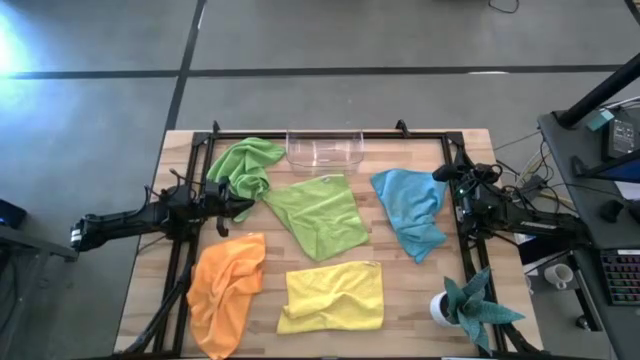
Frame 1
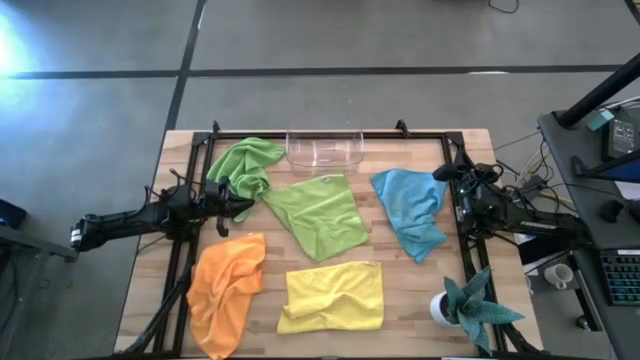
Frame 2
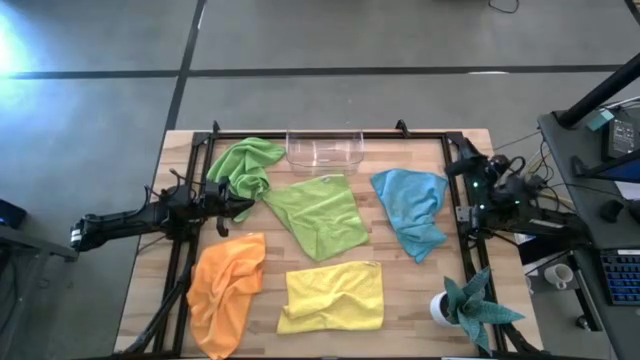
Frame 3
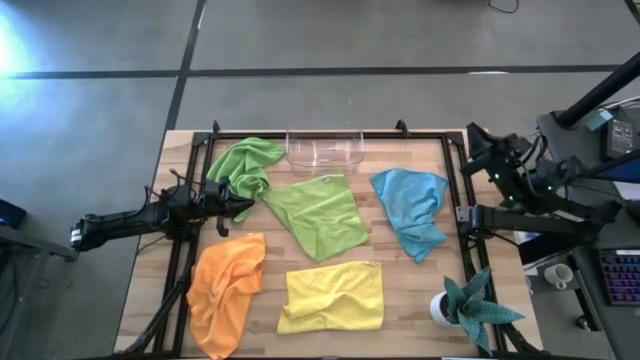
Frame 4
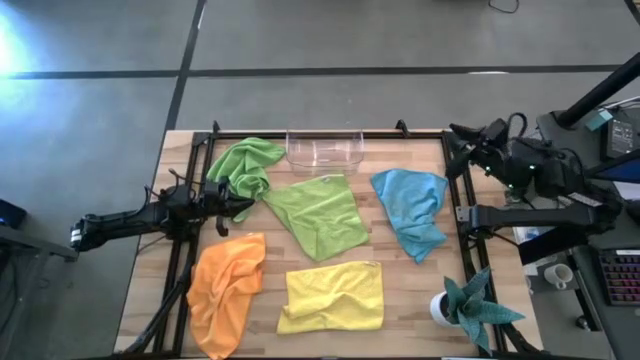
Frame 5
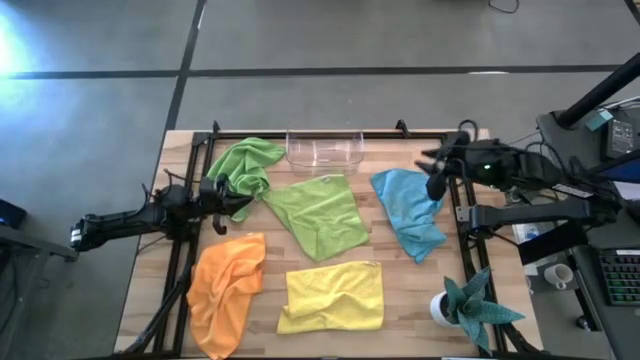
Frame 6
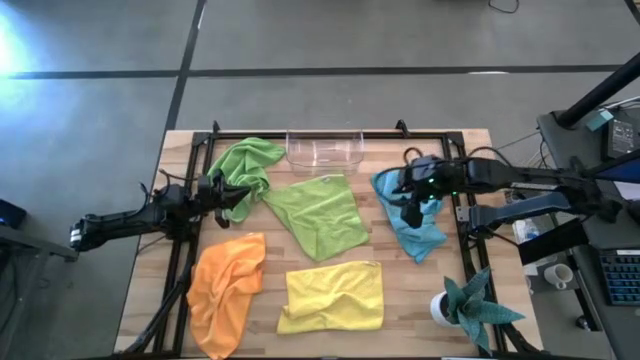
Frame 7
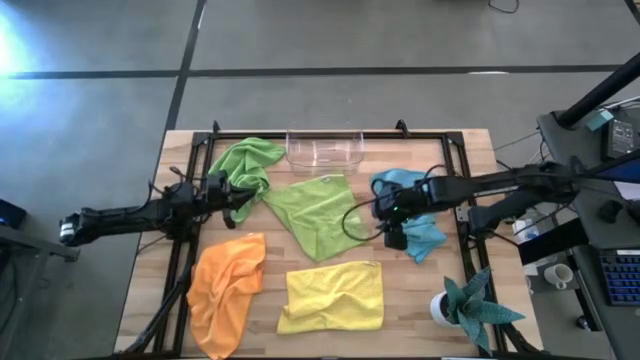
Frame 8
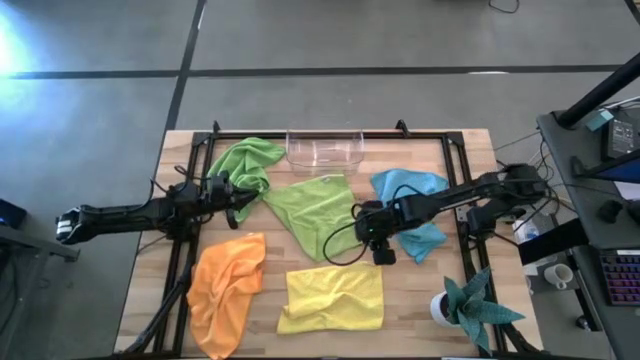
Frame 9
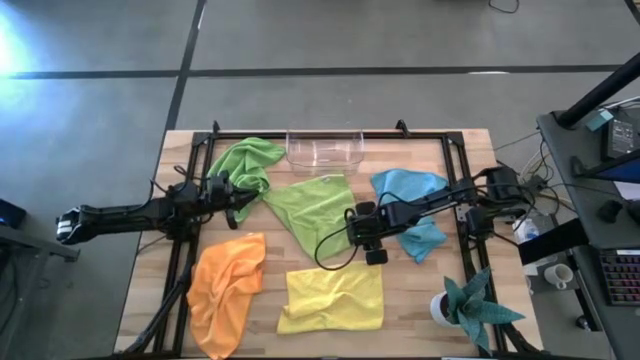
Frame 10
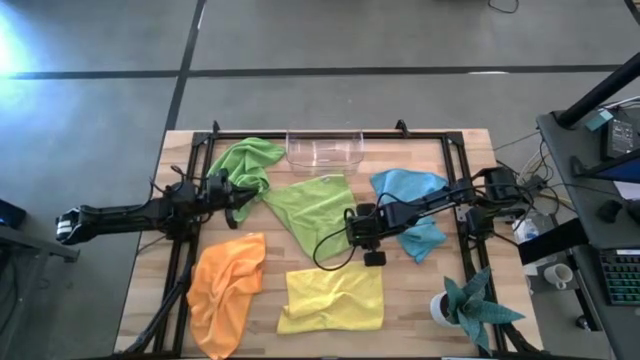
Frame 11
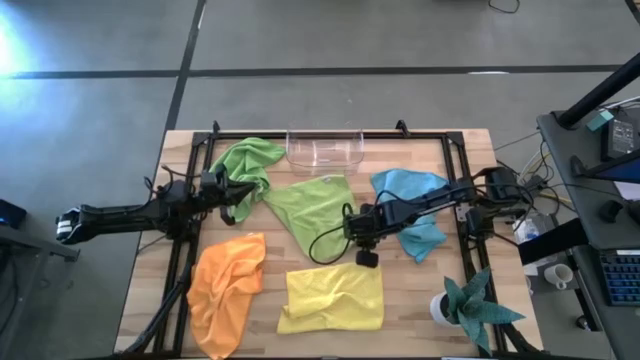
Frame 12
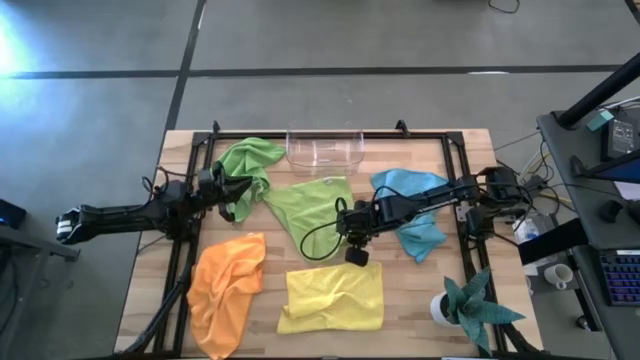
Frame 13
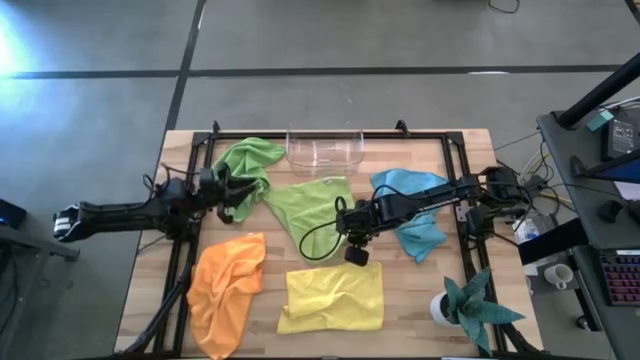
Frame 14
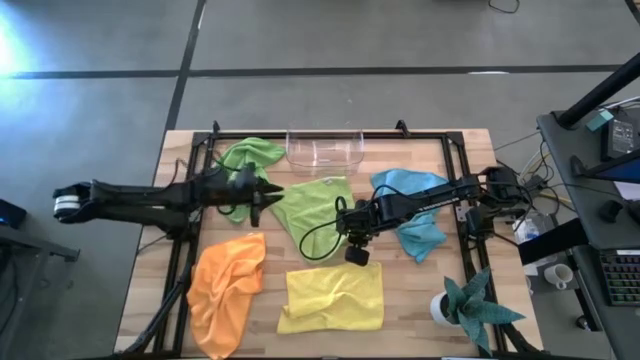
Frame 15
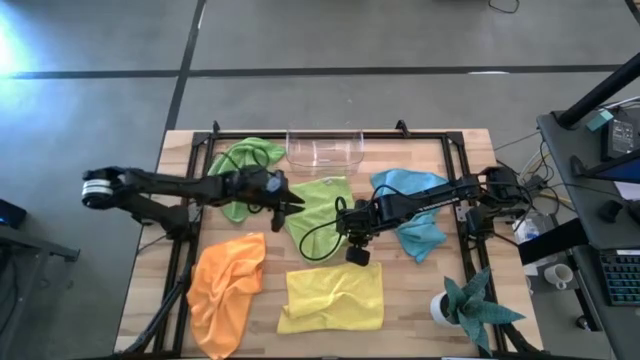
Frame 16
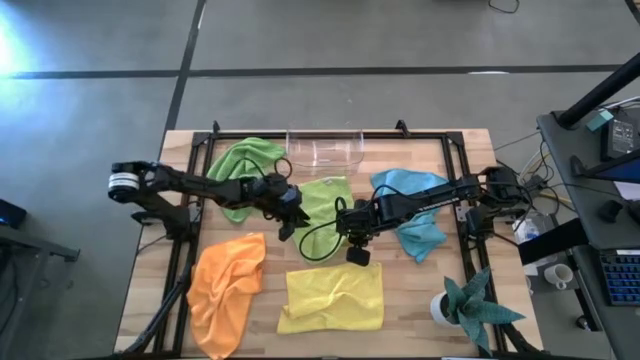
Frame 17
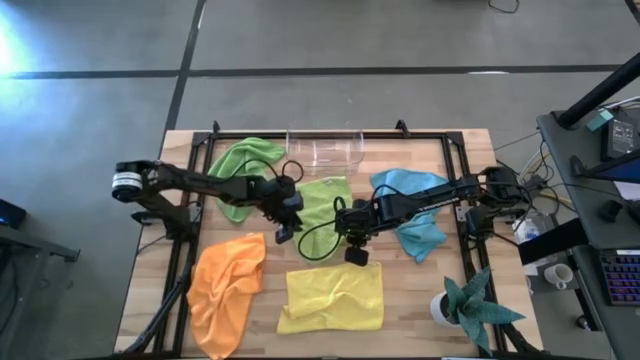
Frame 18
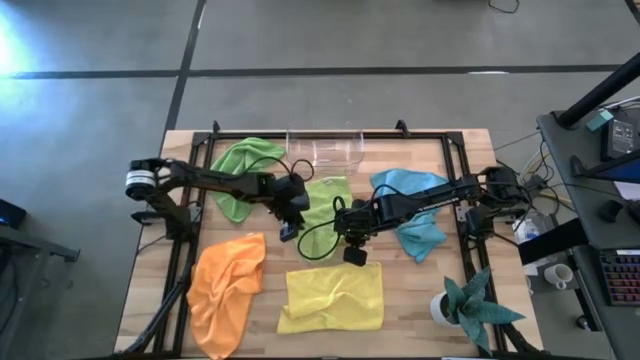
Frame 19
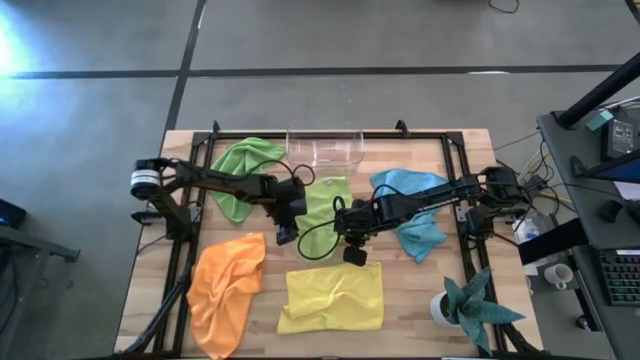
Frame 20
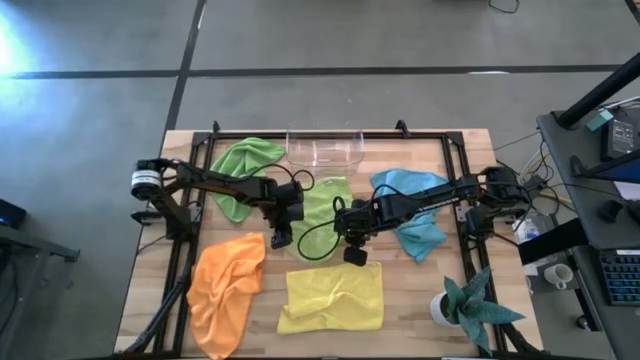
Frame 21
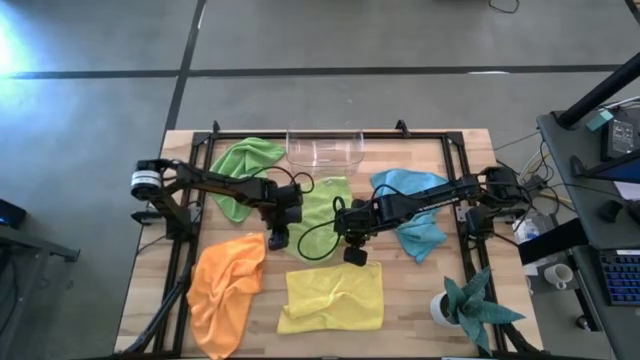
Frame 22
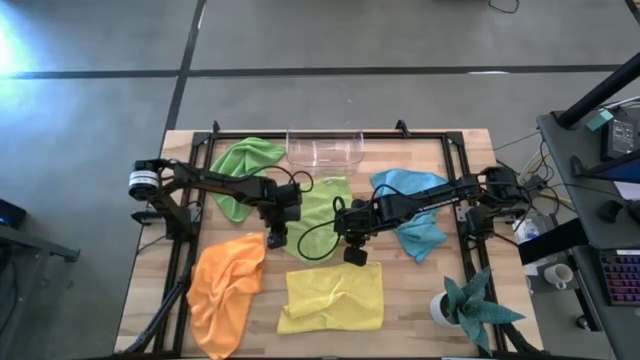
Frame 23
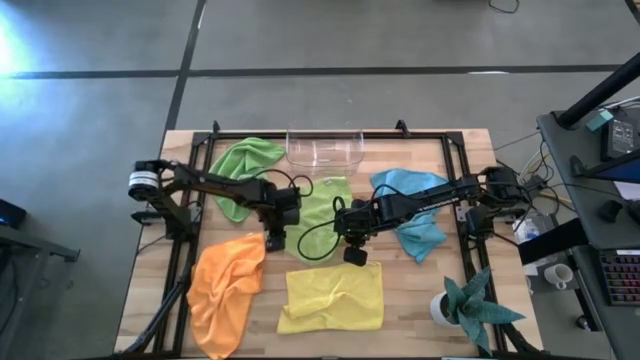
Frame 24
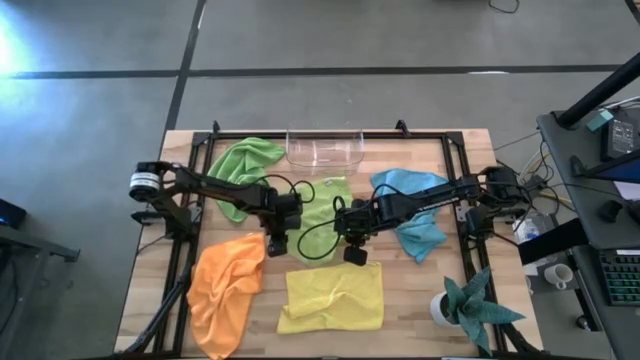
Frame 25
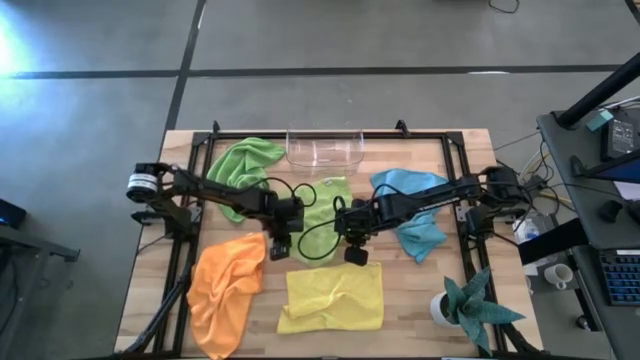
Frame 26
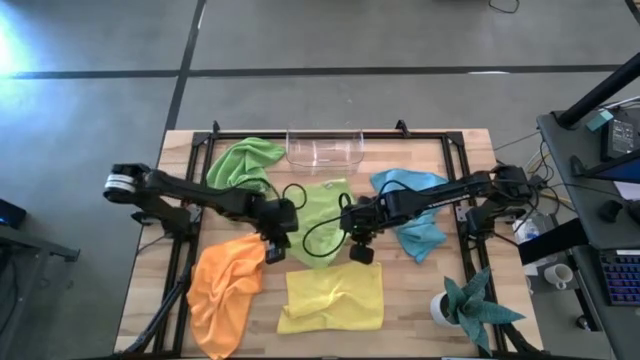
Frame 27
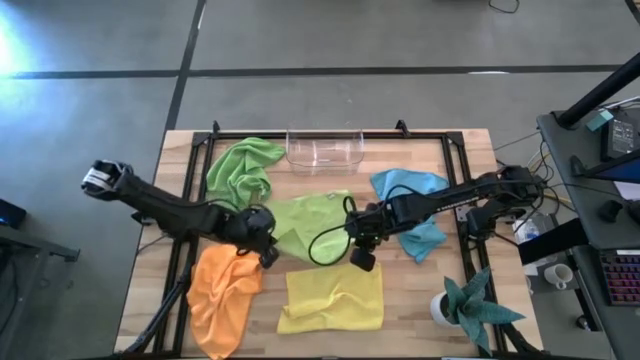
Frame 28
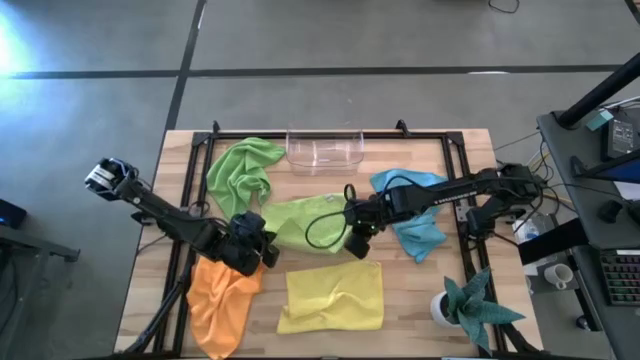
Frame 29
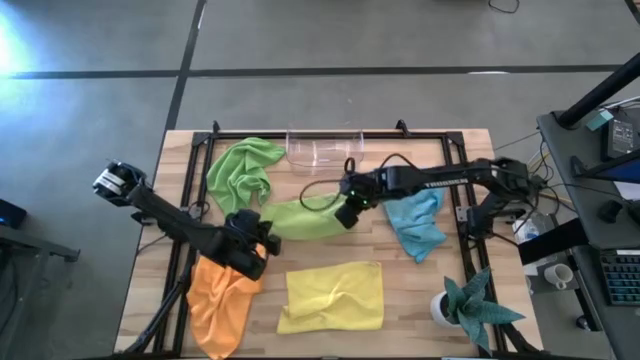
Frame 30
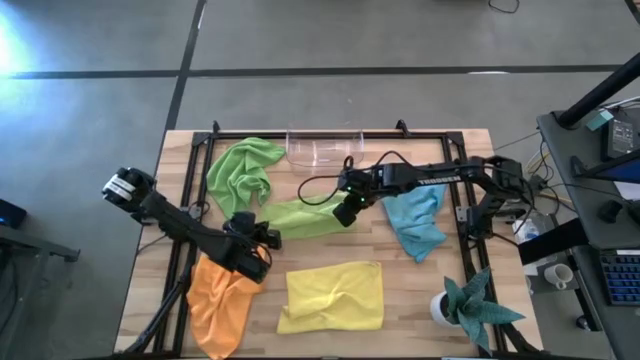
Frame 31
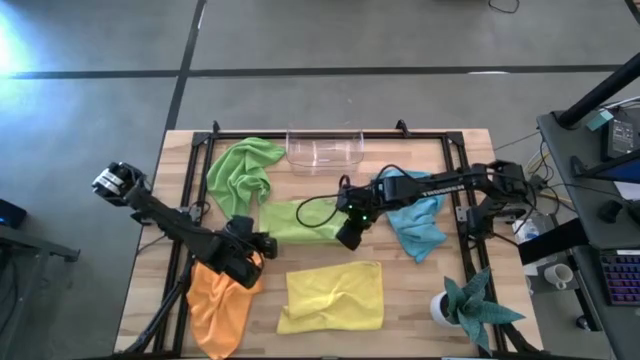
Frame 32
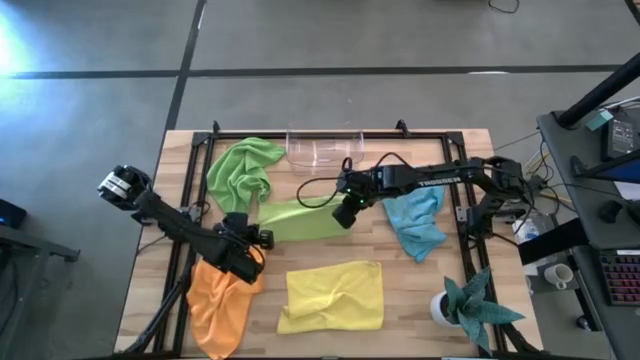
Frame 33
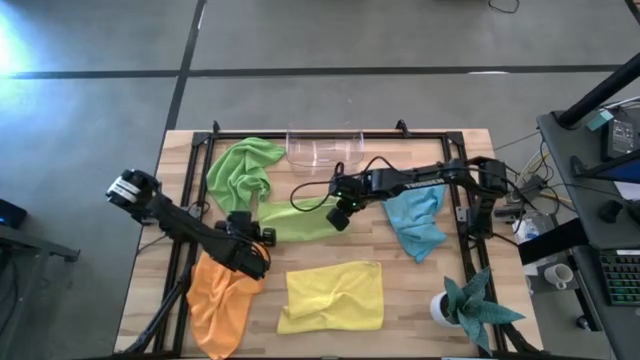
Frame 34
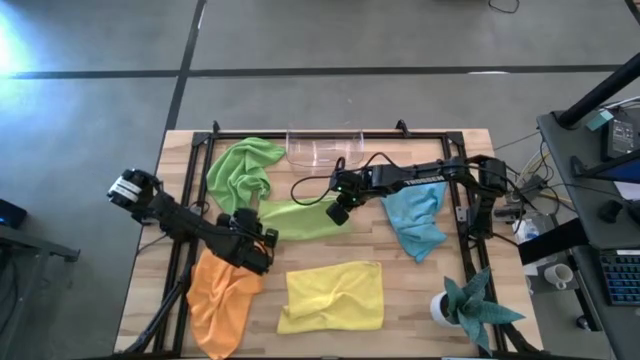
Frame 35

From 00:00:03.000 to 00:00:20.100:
Task: Fold microfiber towels
Fold the green microfiber towel

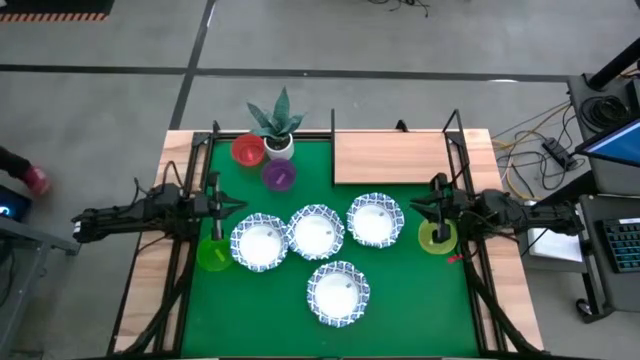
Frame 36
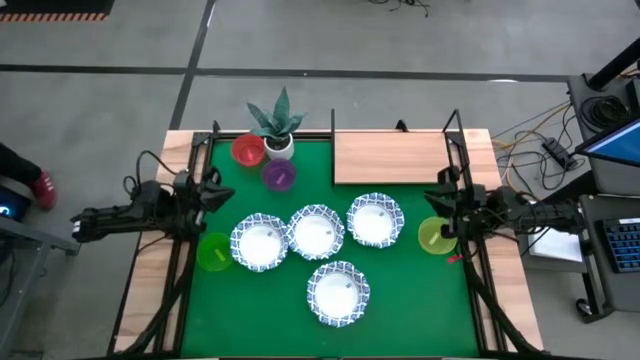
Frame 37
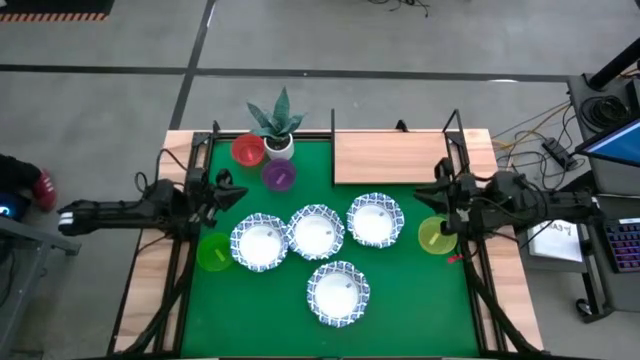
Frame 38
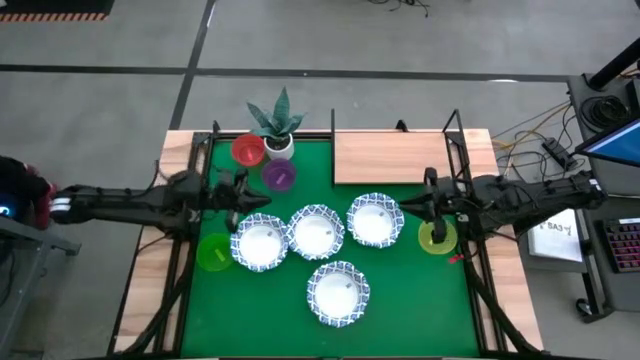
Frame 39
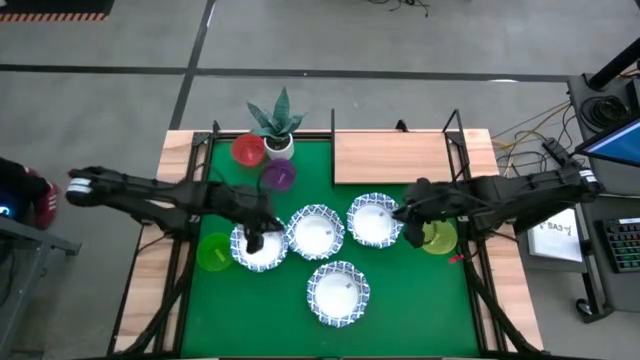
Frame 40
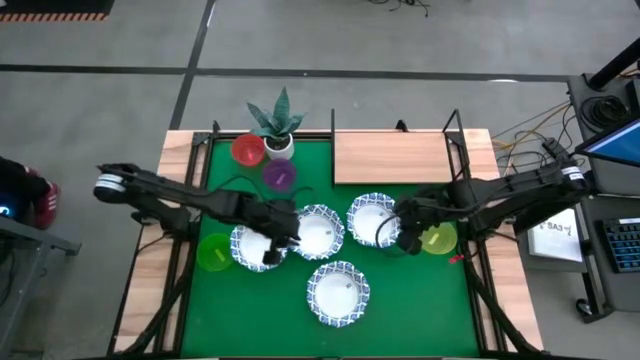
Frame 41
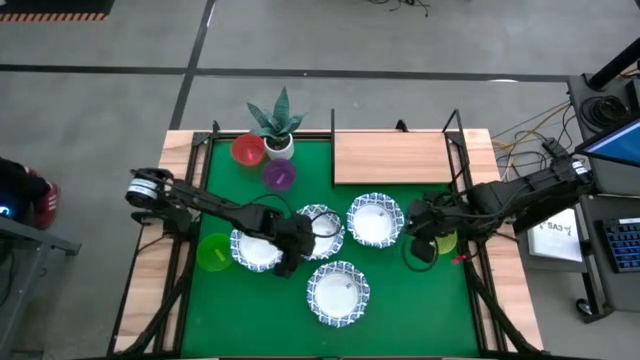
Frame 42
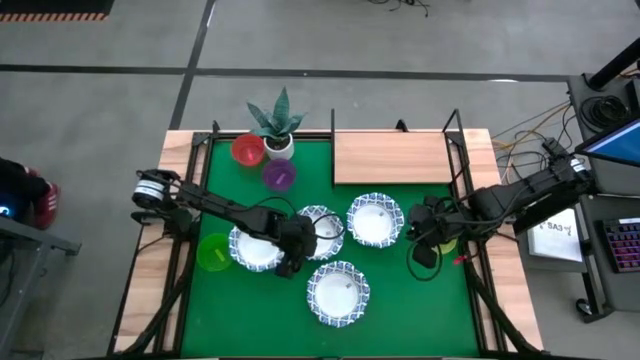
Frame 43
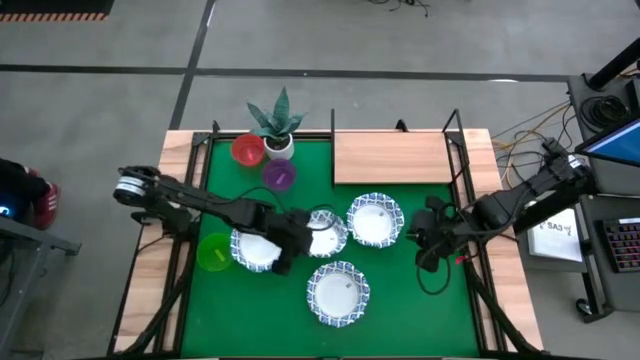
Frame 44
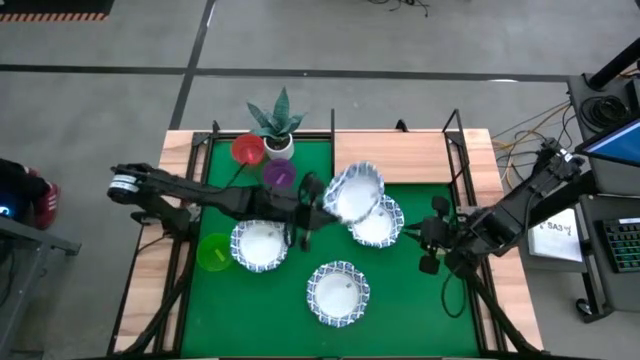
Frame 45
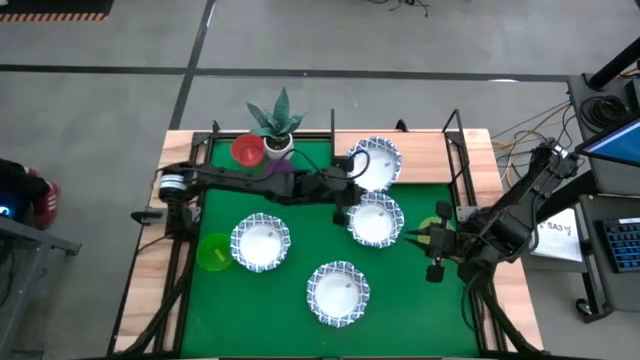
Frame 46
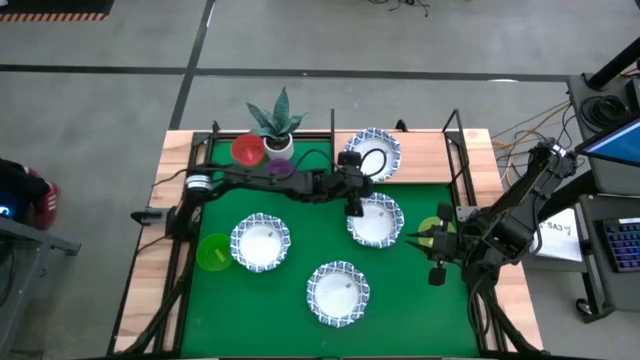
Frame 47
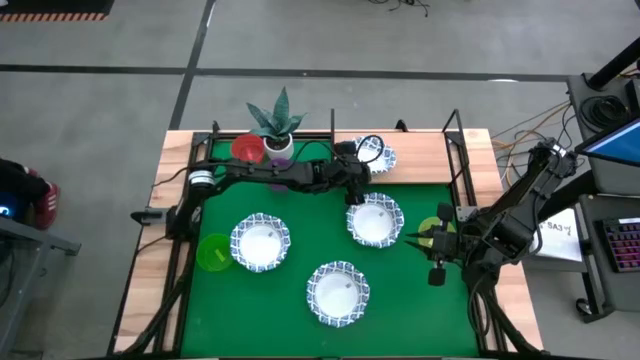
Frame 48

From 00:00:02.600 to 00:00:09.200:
Task: Place and stack bowls onto a shelf
Put the white patterned bowl on the shelf
